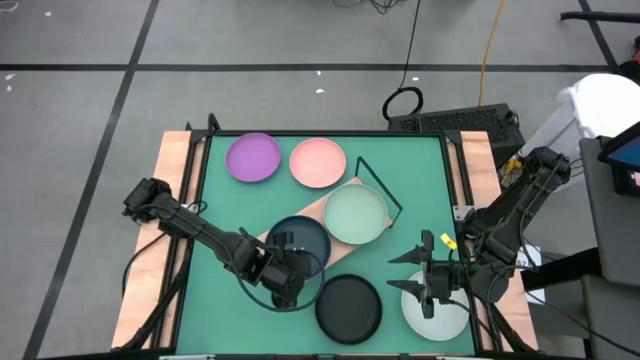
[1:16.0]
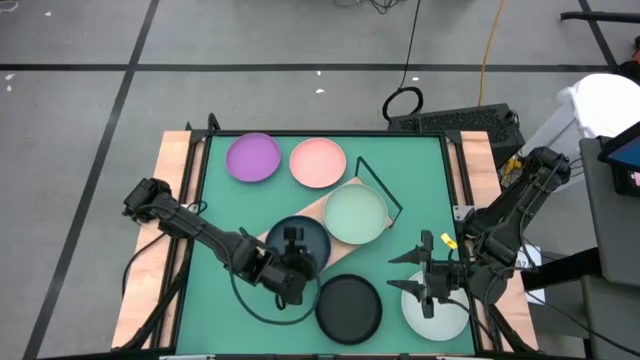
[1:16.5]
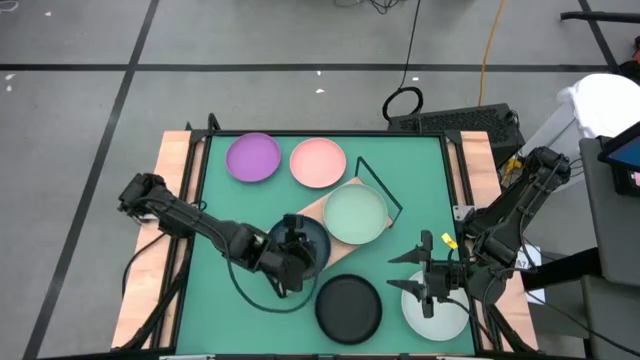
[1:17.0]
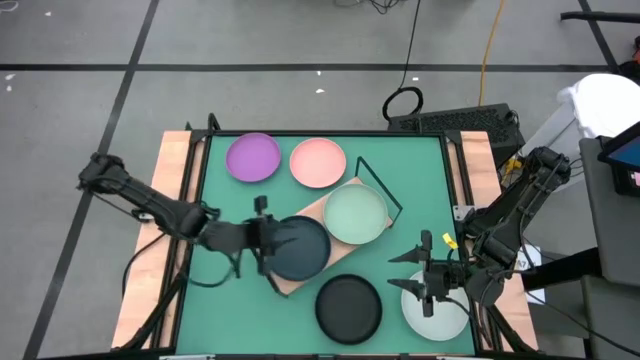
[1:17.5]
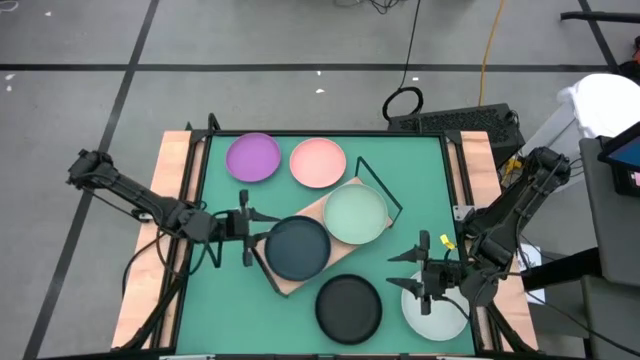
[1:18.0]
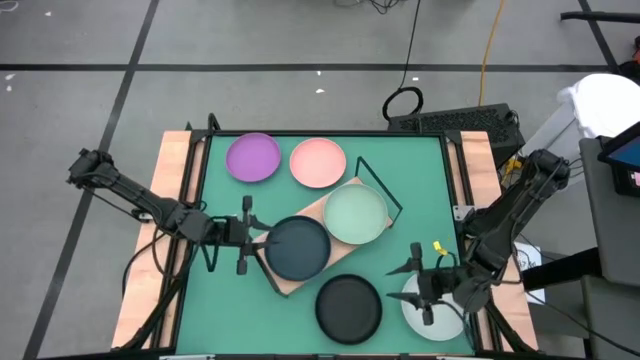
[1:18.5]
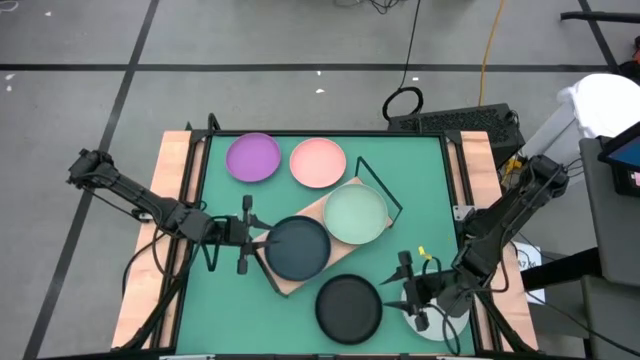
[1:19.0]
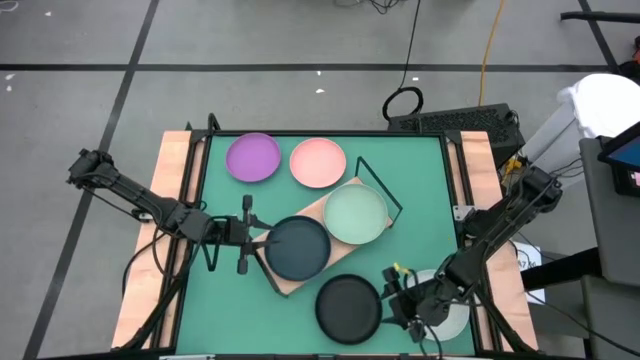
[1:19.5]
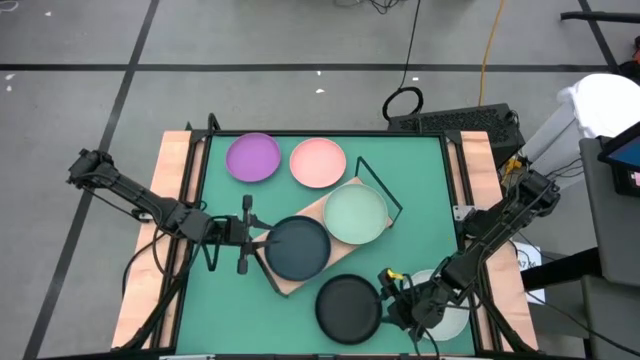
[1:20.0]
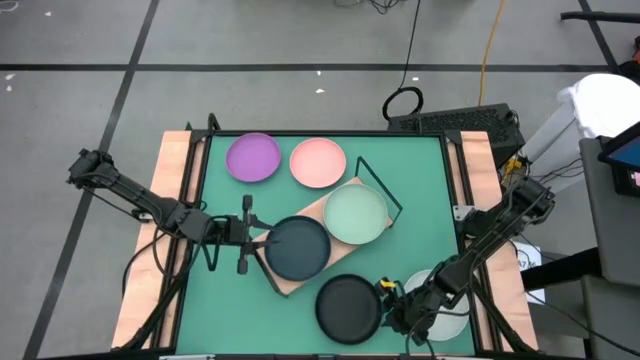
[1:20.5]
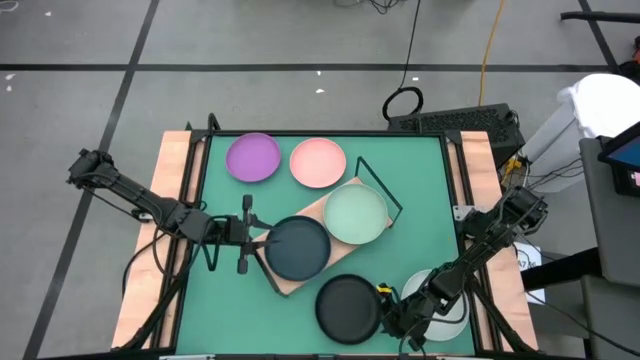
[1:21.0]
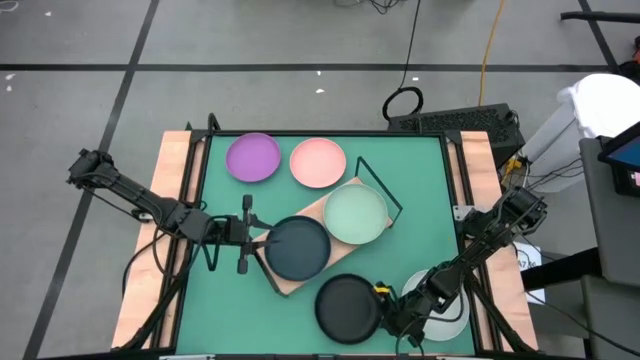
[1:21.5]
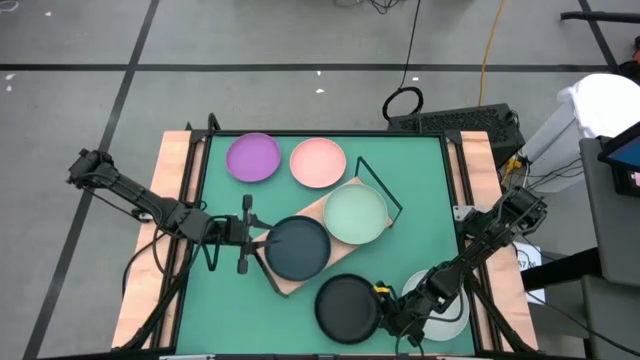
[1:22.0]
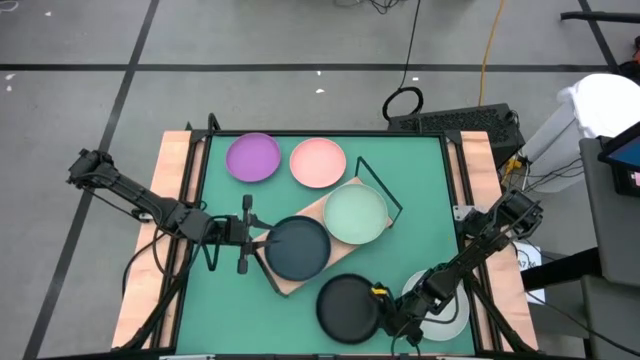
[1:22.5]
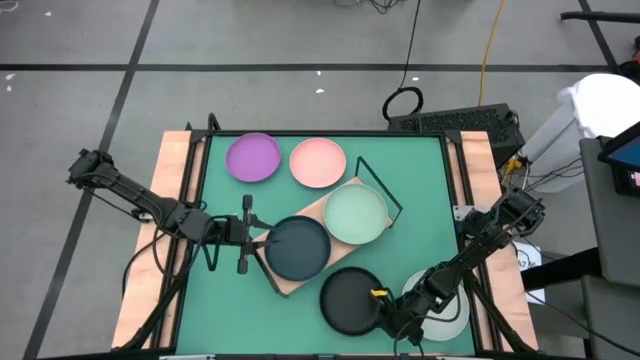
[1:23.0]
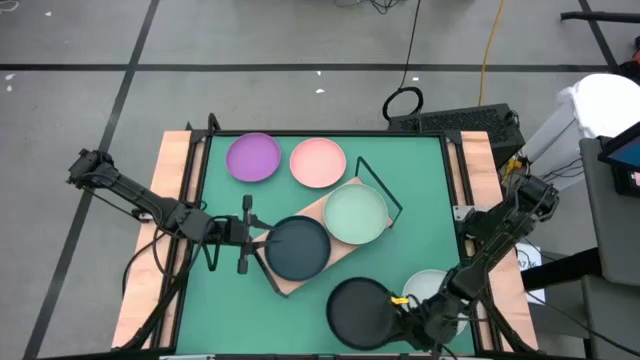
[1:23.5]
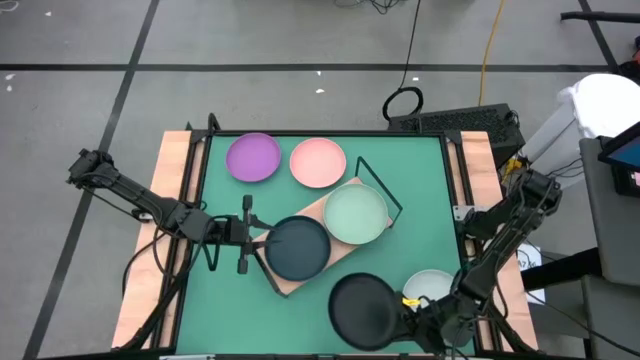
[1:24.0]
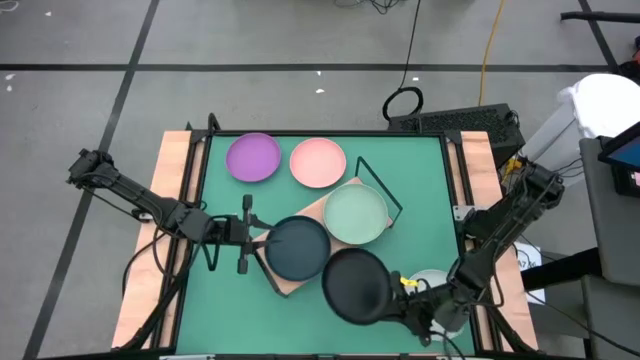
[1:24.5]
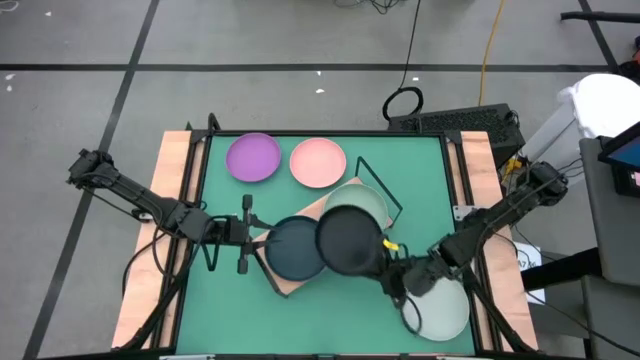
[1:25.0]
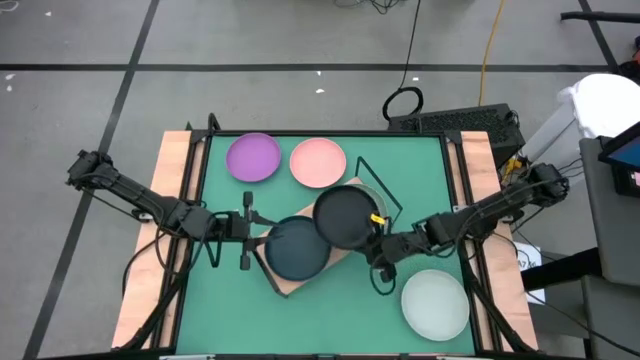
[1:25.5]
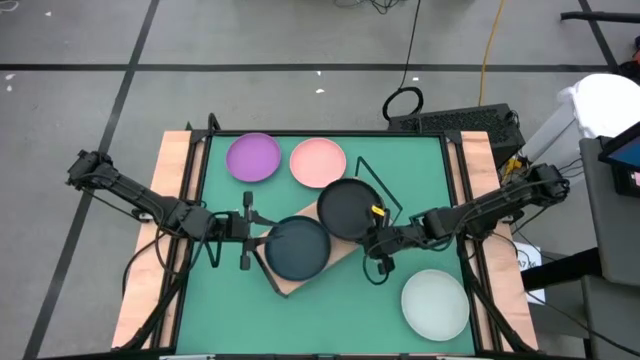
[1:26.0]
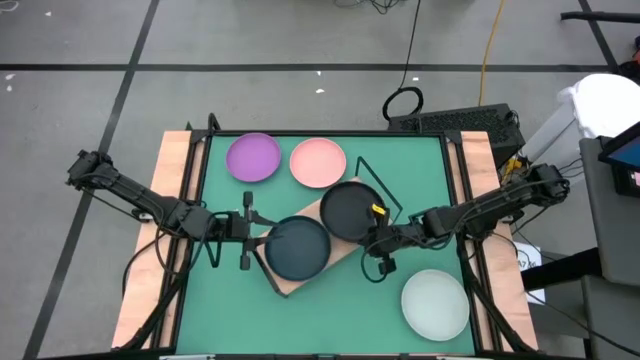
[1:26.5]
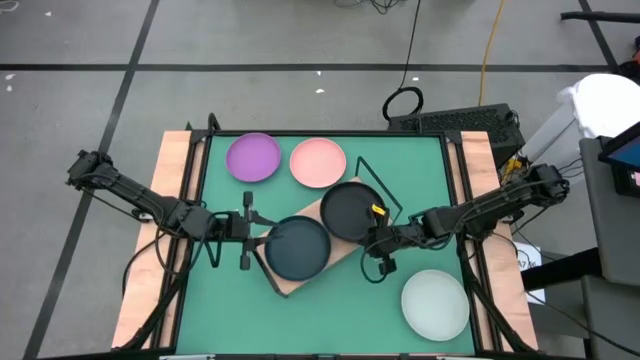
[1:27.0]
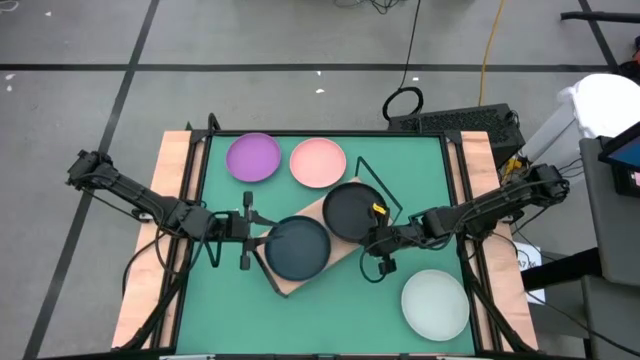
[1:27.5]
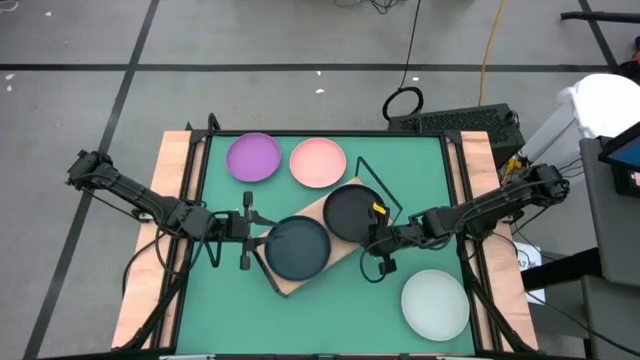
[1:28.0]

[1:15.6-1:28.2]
Task: Place and stack plates onto a shelf
Stack the black plate on top of the green plate on the shelf
